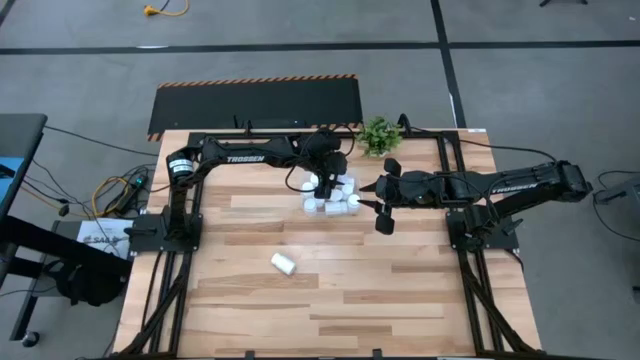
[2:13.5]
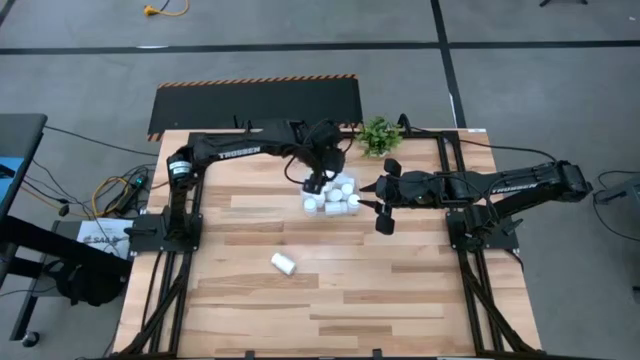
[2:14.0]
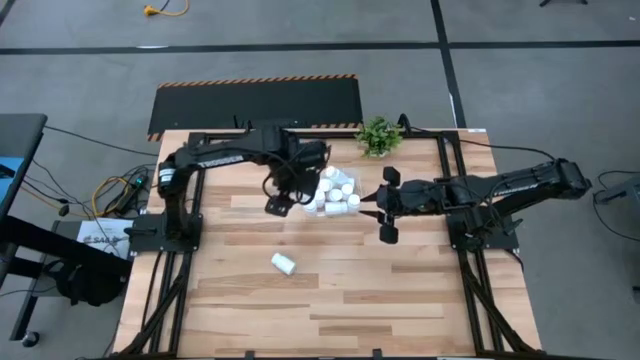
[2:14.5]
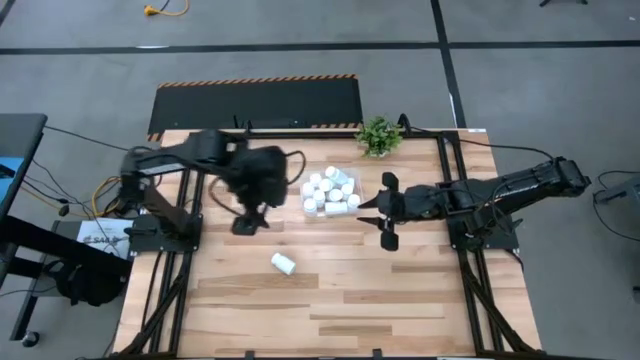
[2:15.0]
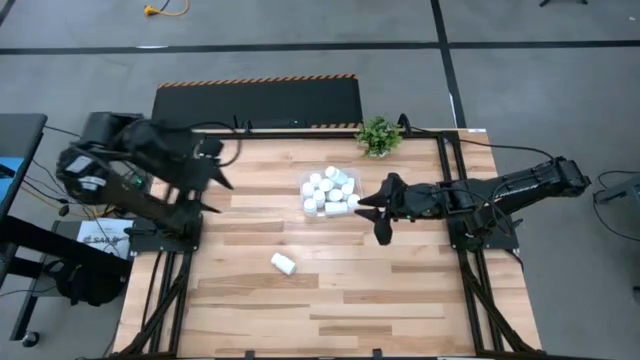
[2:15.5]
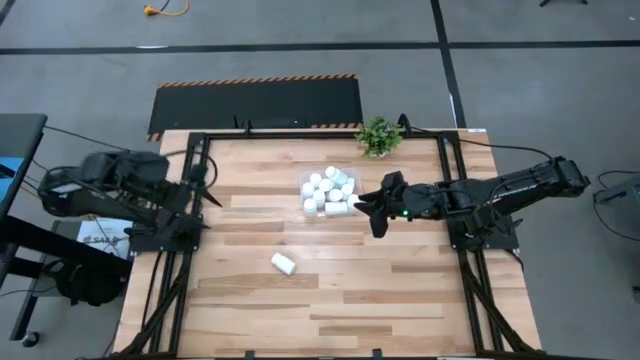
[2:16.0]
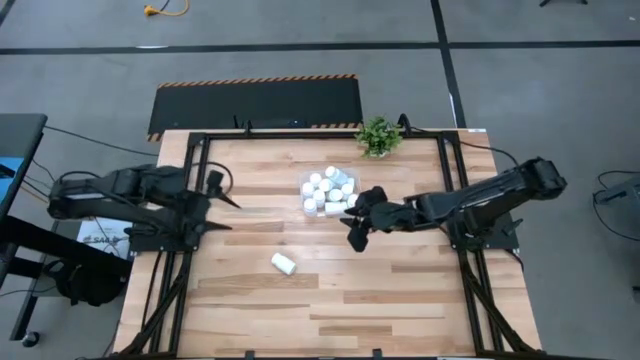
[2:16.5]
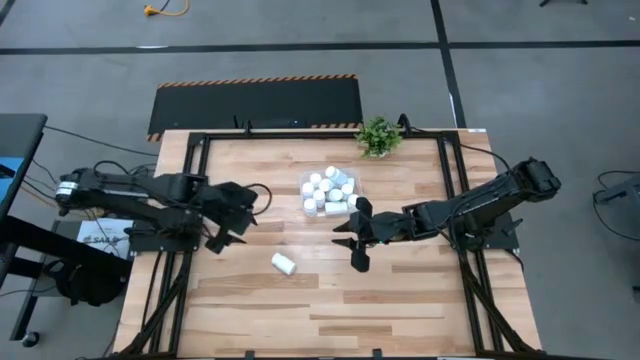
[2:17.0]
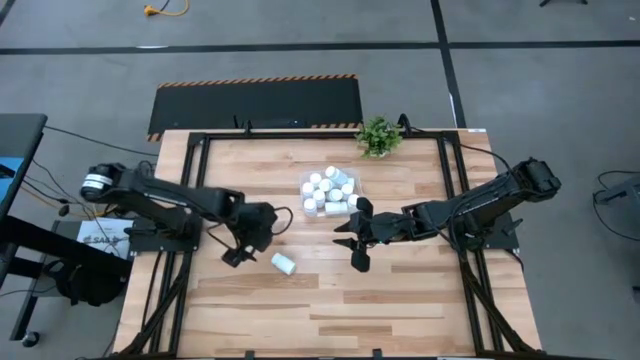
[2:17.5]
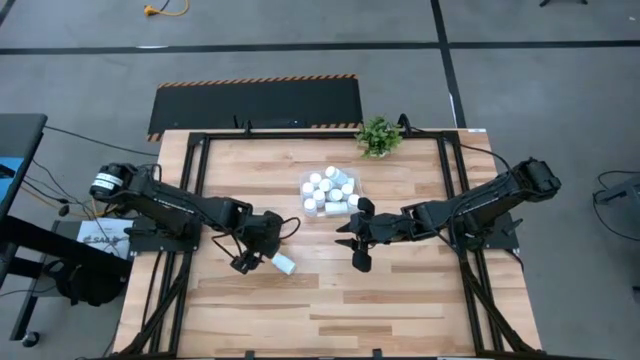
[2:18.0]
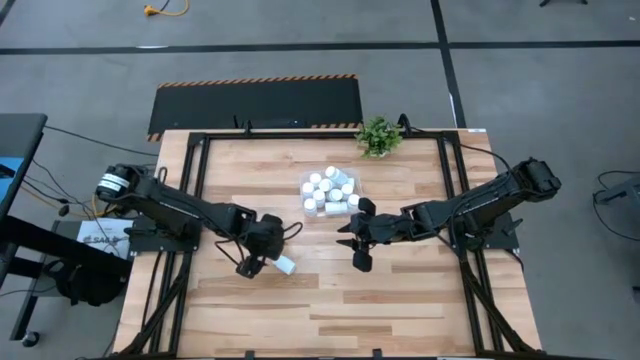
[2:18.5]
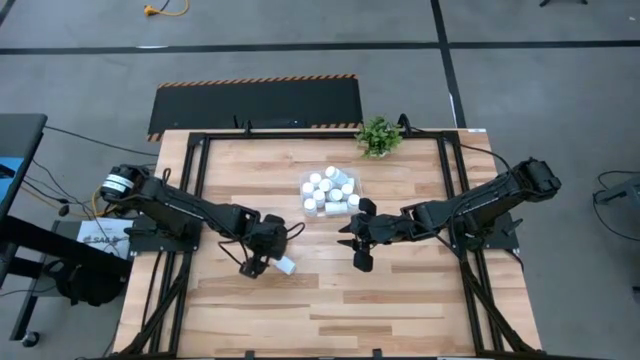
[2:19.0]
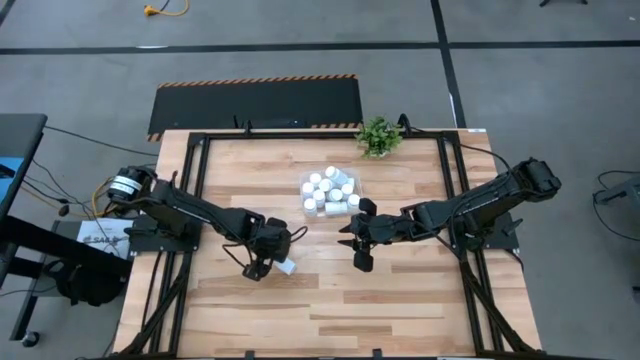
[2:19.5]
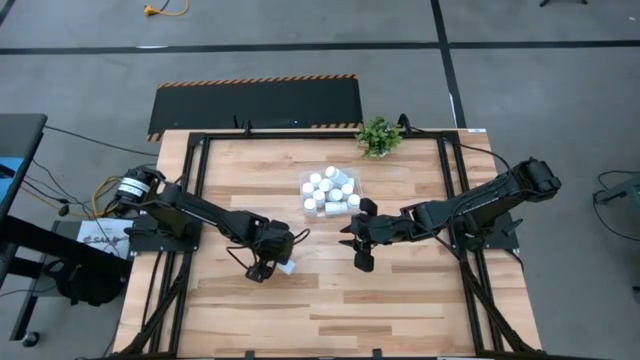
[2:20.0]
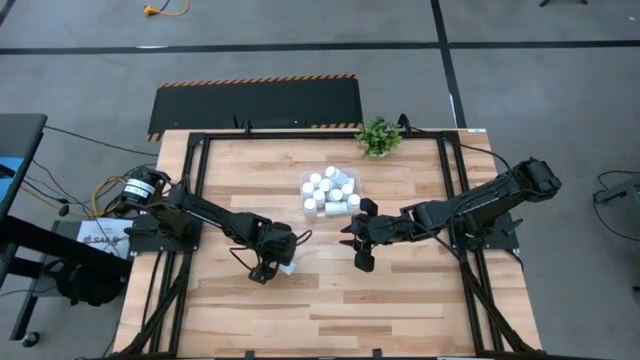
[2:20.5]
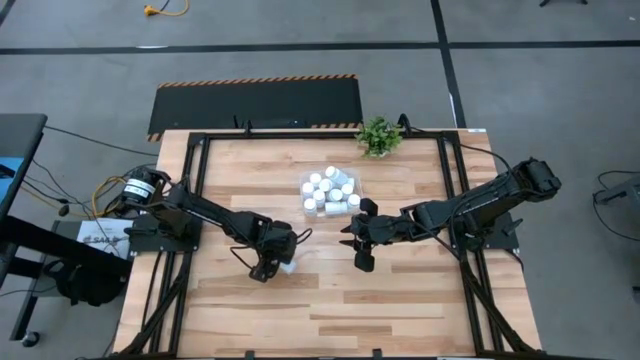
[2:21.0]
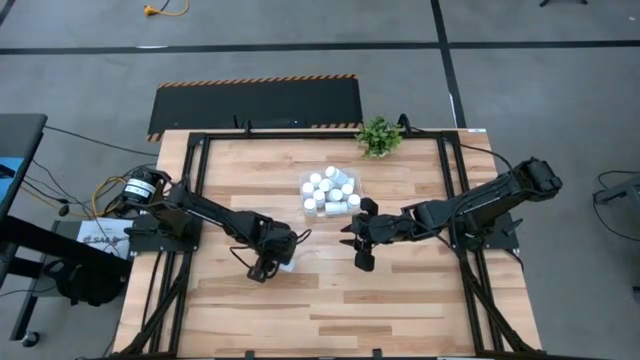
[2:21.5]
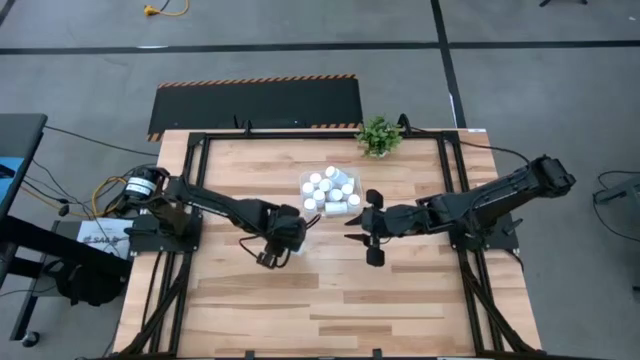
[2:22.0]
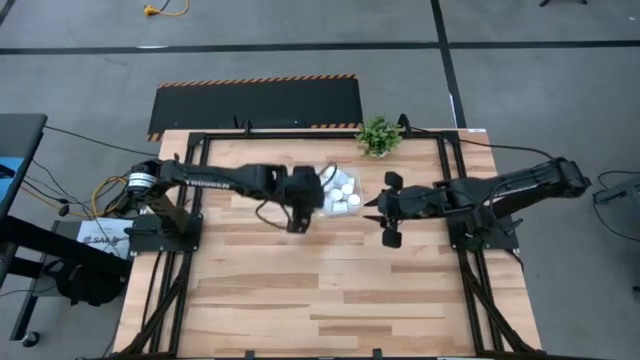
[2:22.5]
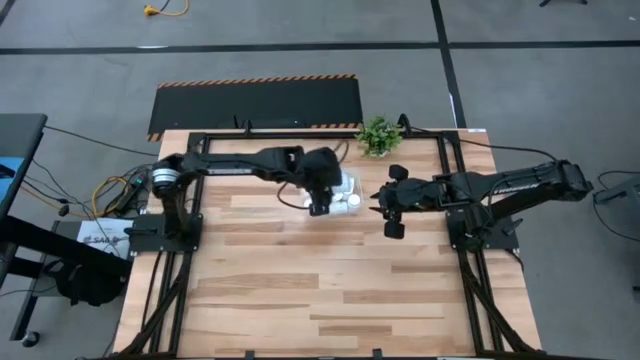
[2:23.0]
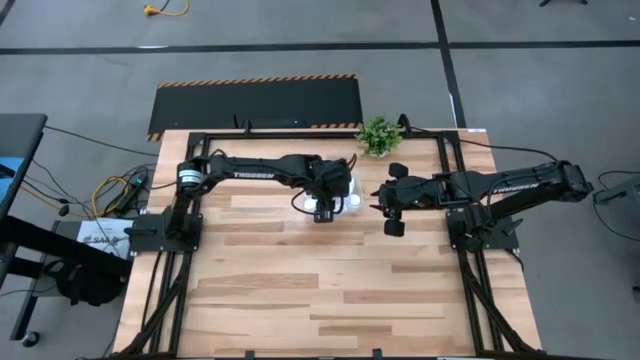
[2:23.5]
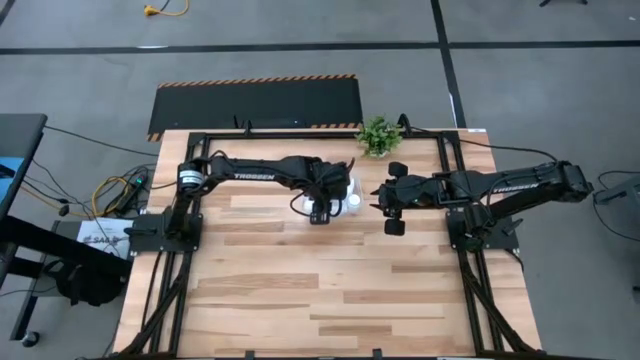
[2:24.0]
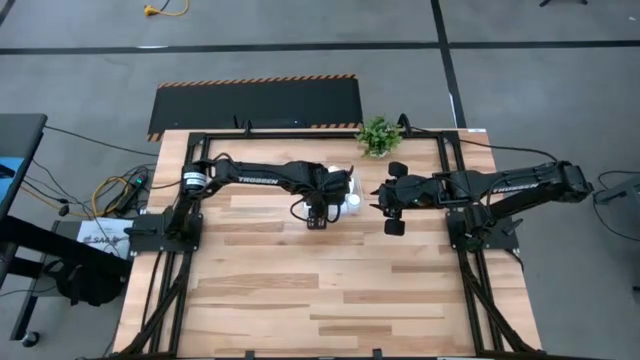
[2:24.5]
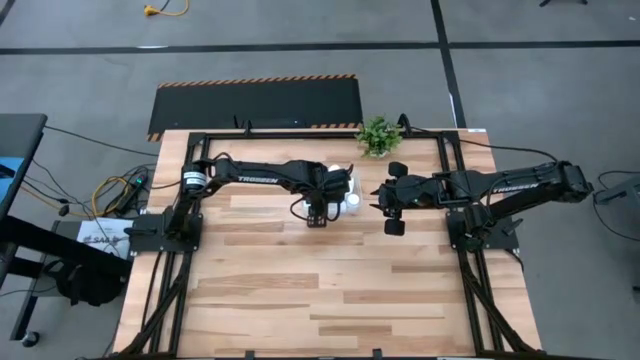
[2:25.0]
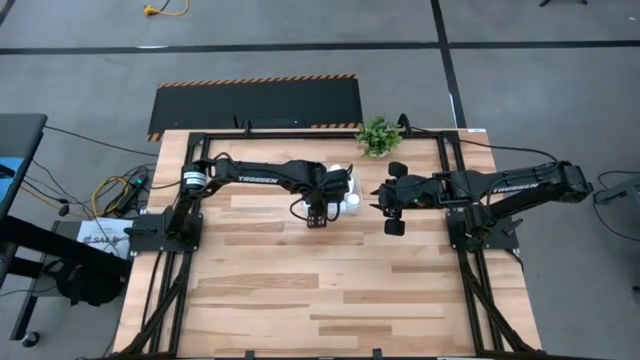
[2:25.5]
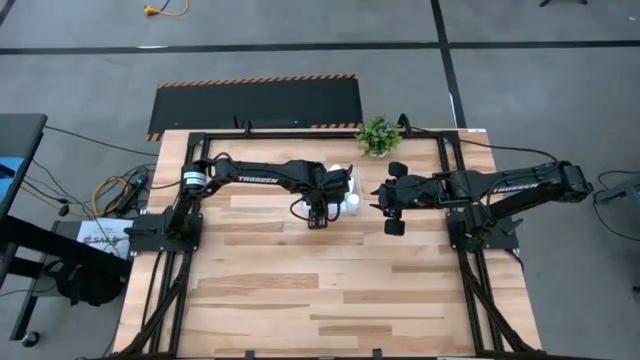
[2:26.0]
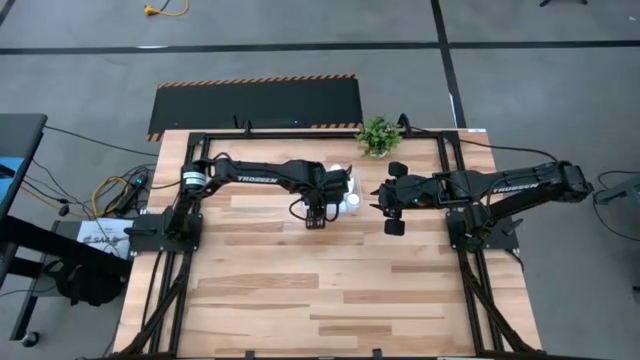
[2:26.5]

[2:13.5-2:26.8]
Task: Pick and place pill bottles into a basket
Put the white medicine bottle into the transparent bin

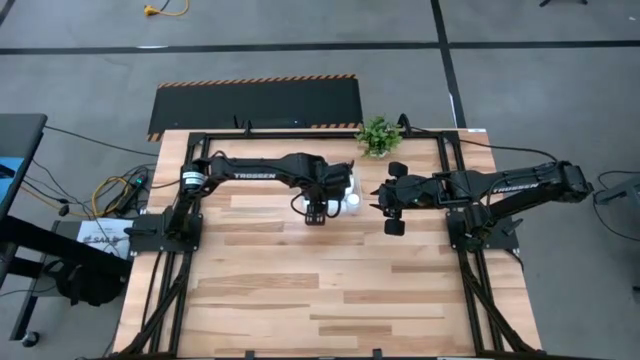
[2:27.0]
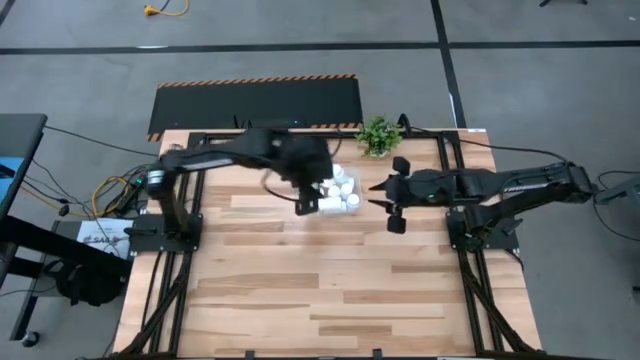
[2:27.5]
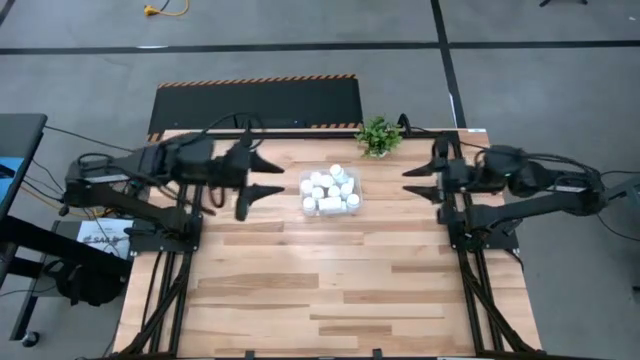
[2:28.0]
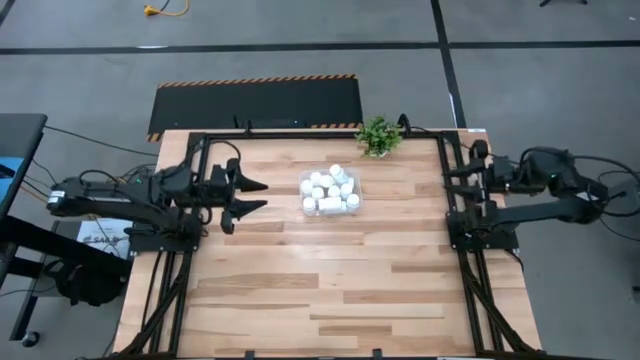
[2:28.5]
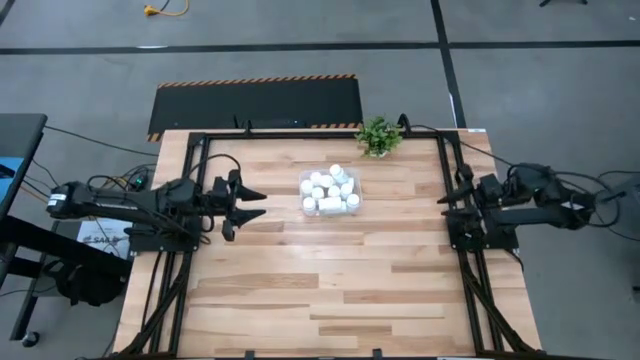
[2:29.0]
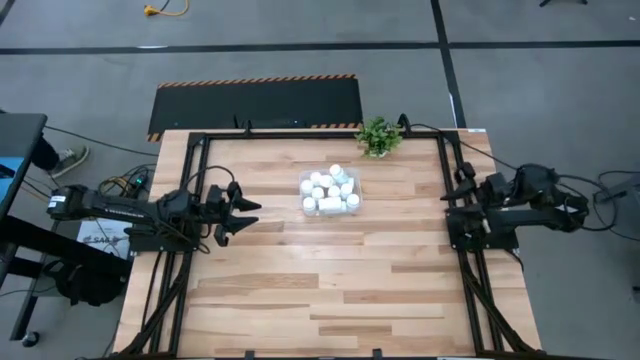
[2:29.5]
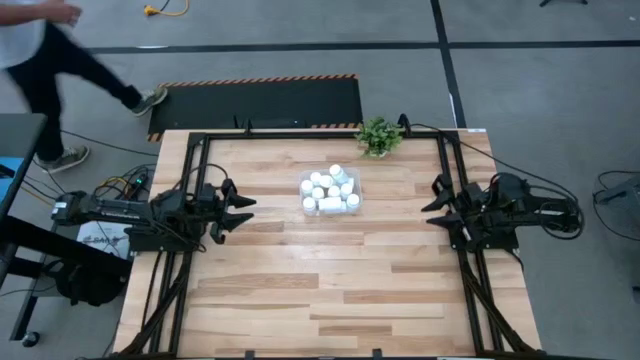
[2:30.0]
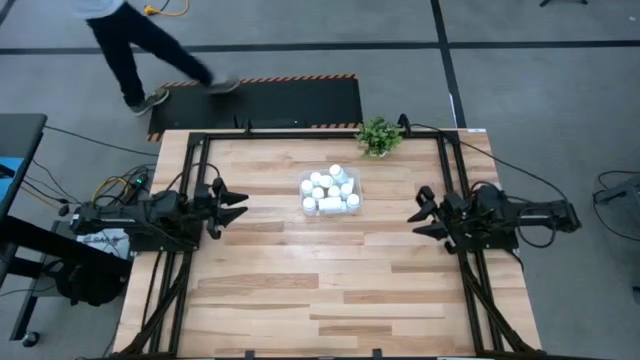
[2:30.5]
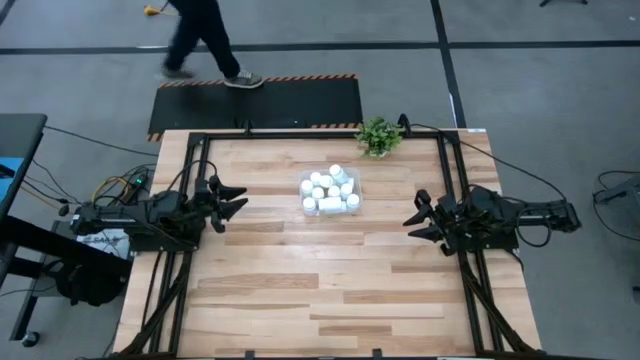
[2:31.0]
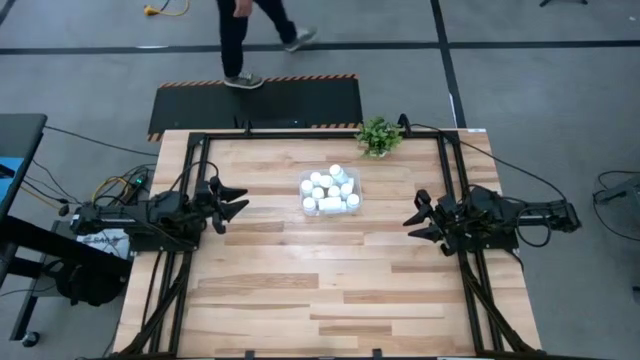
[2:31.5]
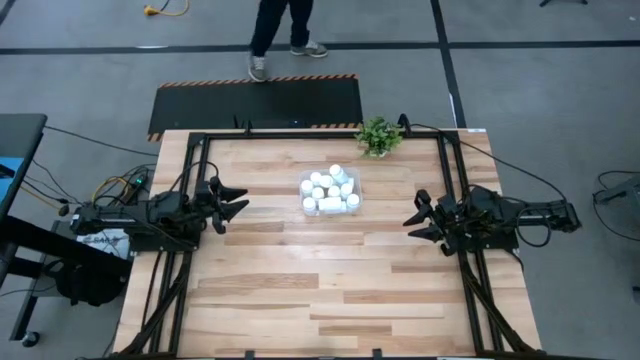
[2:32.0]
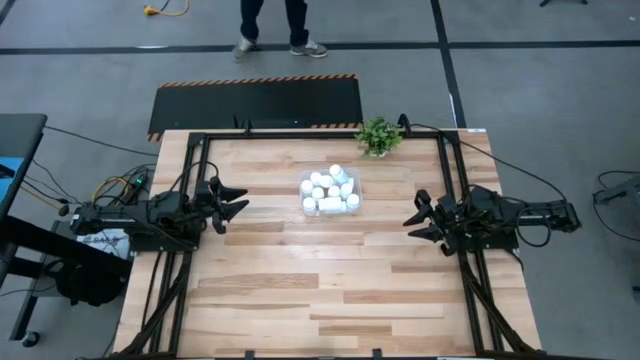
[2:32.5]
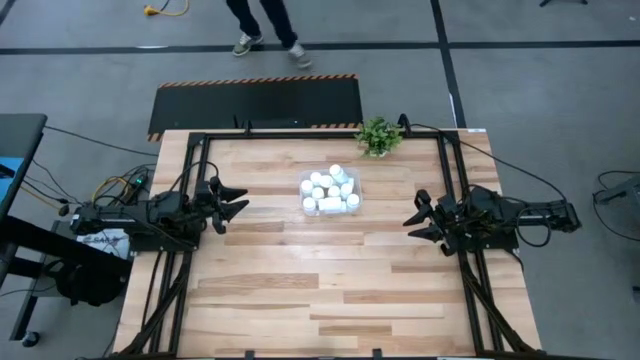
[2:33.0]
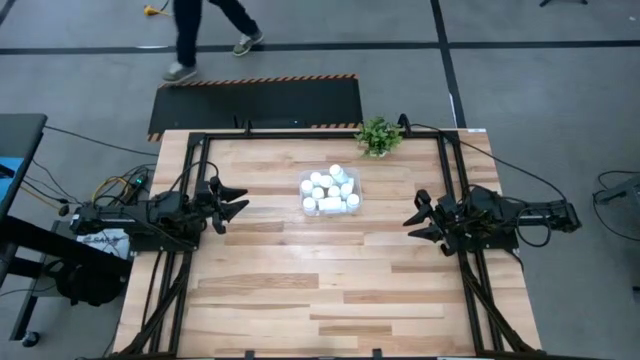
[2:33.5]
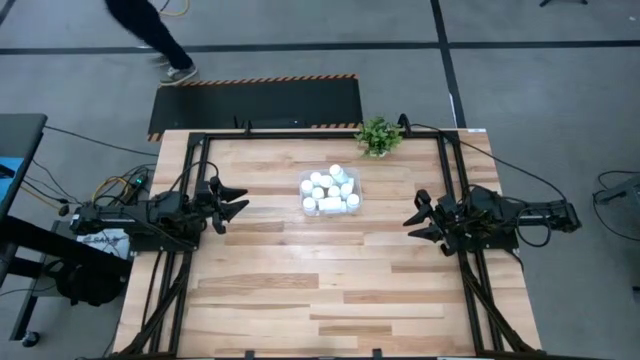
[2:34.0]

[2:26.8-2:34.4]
Return to Home Position
